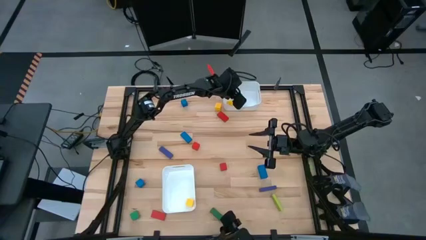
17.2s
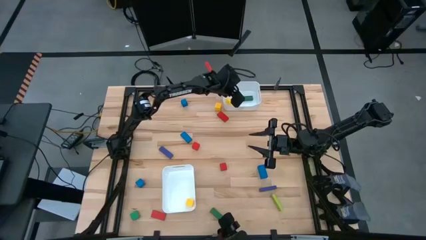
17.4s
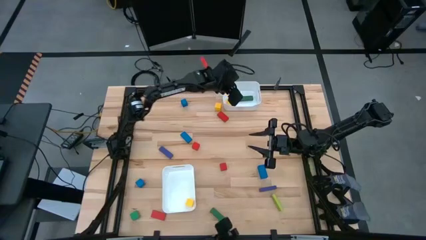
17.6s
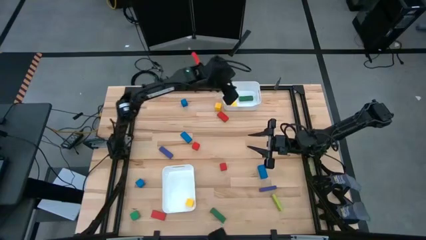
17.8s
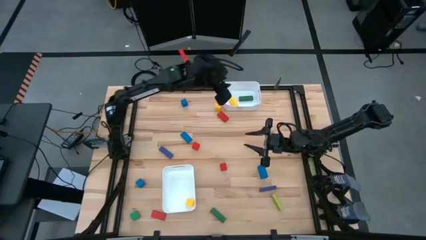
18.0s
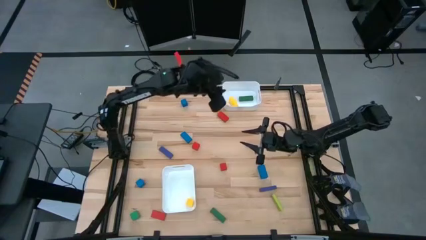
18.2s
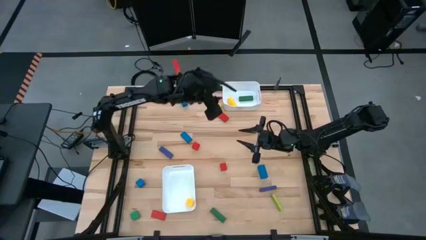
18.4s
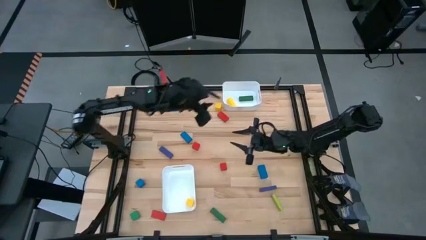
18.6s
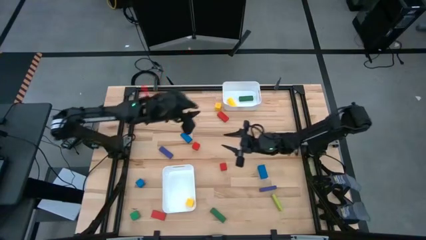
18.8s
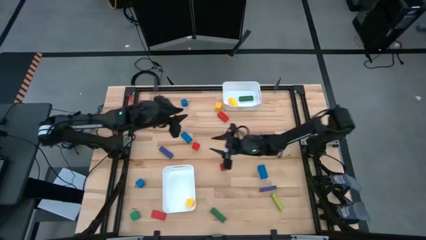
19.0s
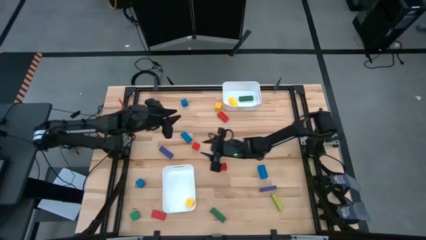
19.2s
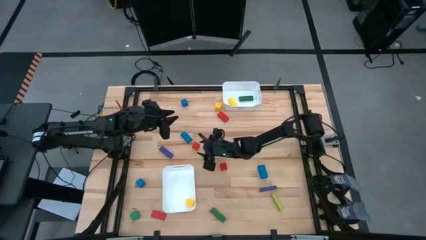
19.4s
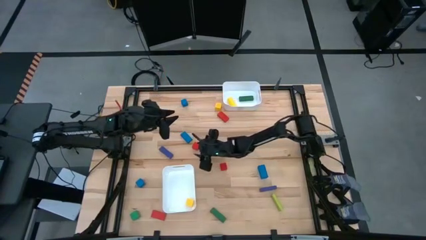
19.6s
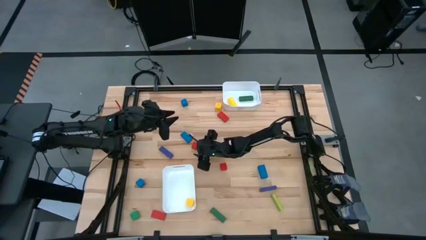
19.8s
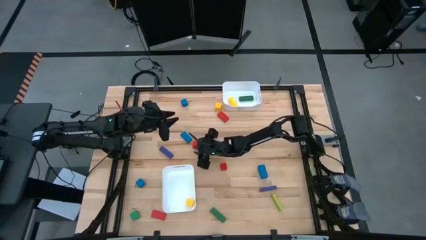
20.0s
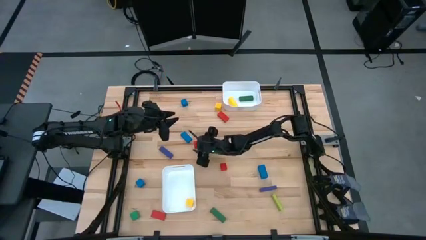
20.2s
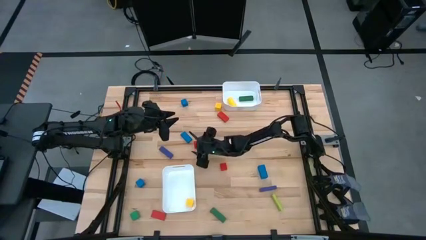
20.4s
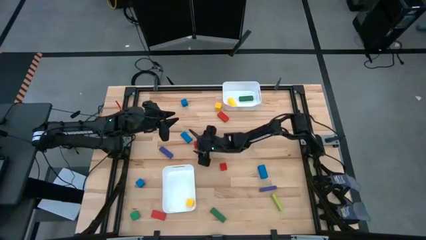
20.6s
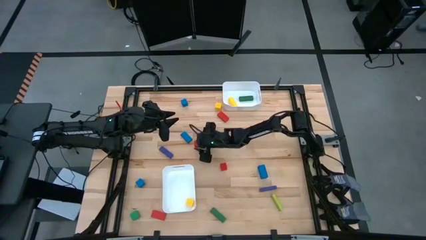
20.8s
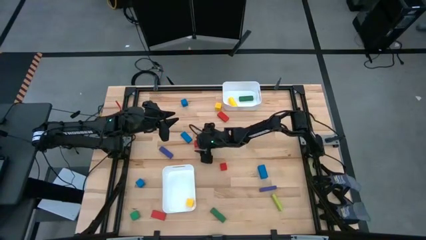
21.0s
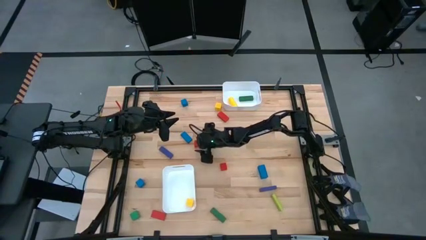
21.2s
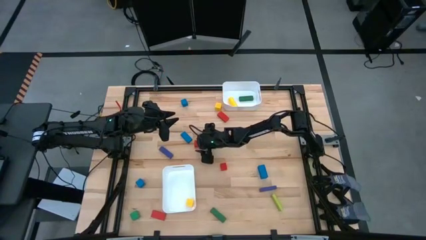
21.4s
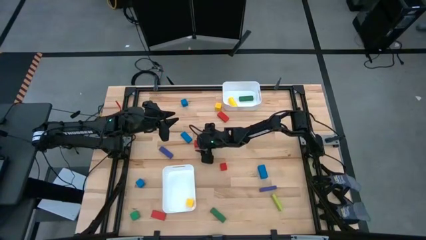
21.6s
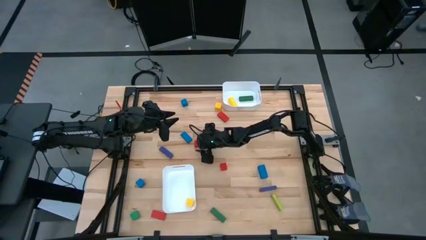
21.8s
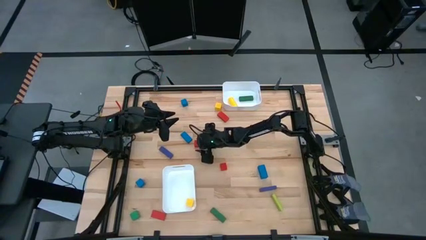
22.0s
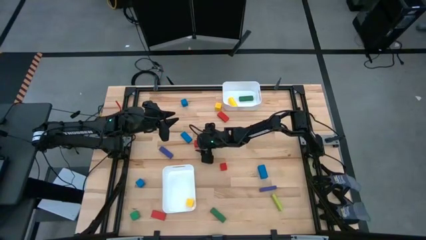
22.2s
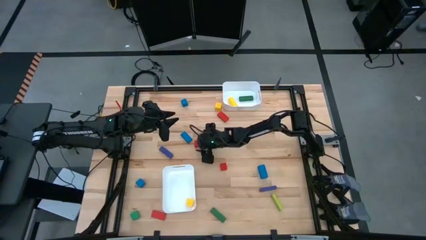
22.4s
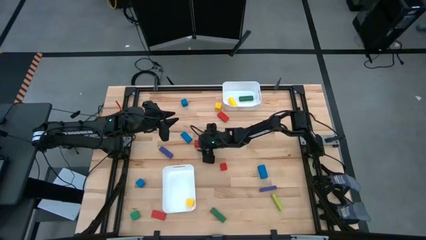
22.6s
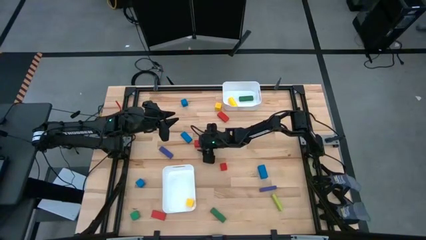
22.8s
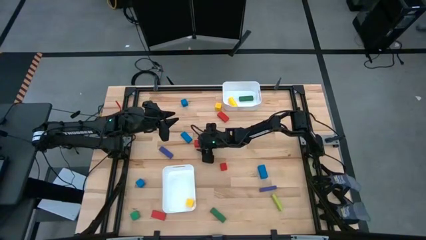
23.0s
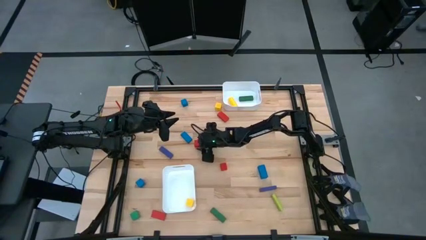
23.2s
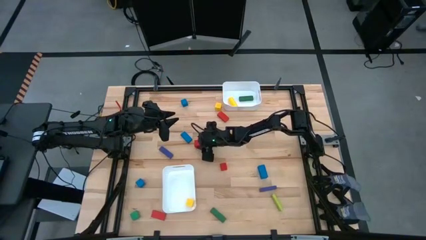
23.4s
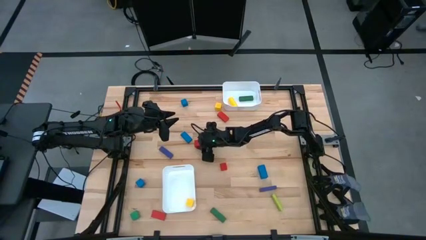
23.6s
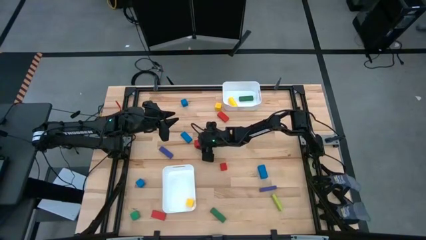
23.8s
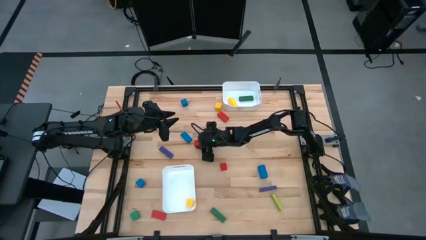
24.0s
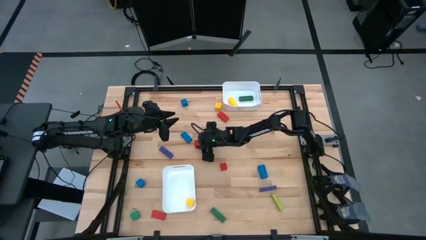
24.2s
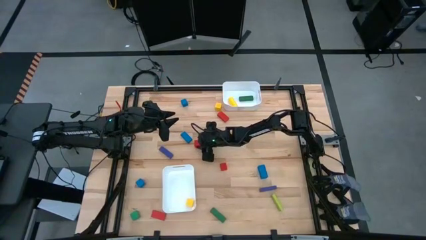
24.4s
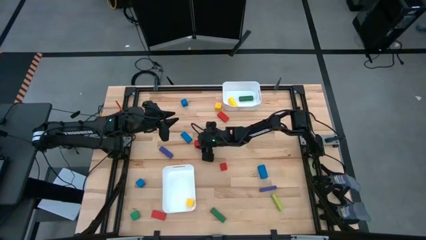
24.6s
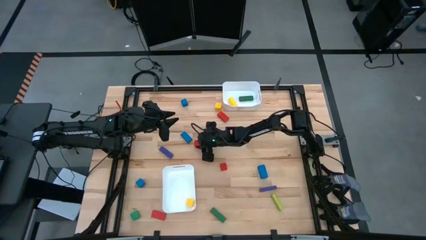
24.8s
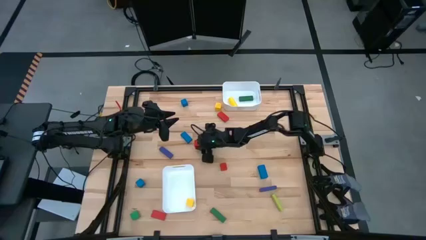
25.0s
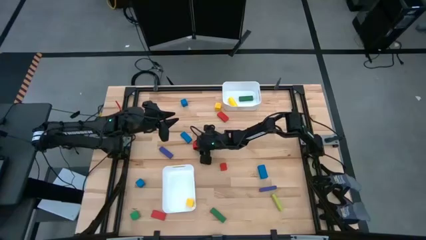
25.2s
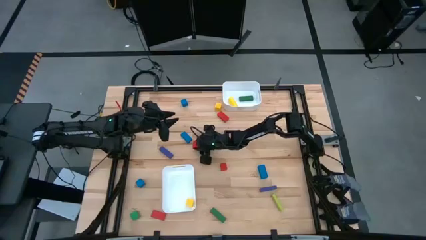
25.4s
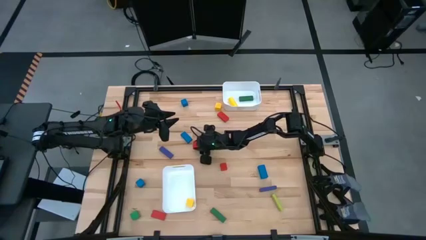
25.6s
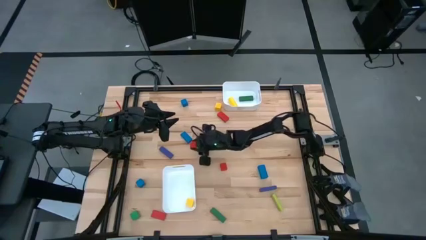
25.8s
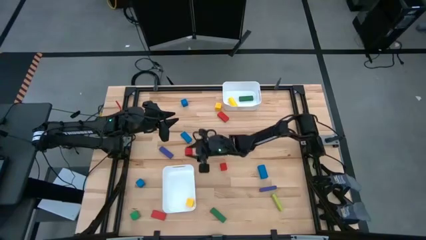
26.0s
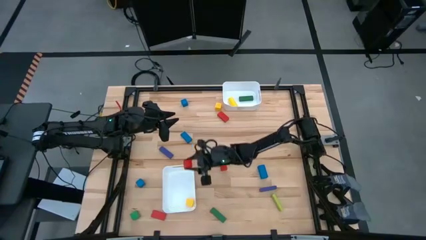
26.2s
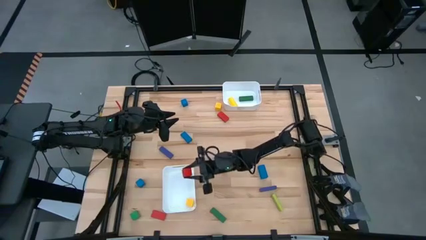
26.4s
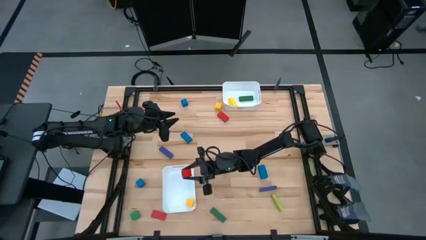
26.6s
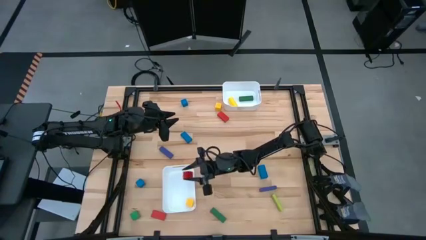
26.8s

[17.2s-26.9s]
Task: Sort blocks by size
Put the red small block into the bottom white bin

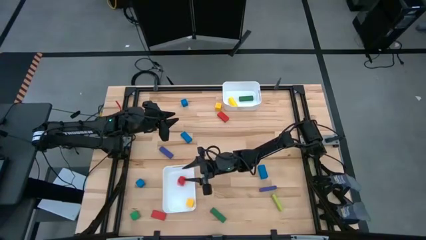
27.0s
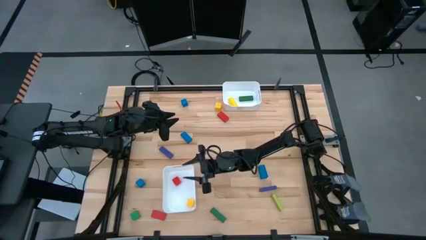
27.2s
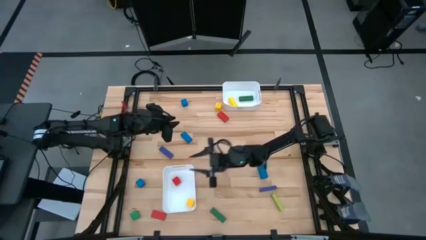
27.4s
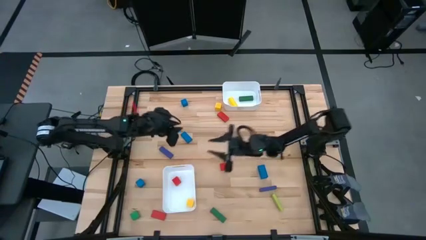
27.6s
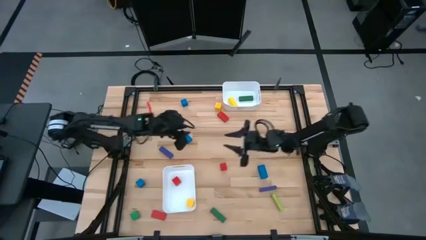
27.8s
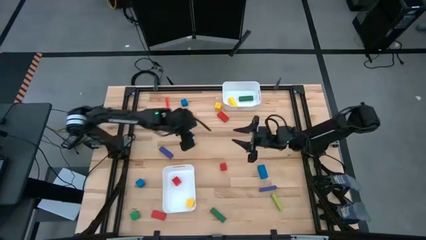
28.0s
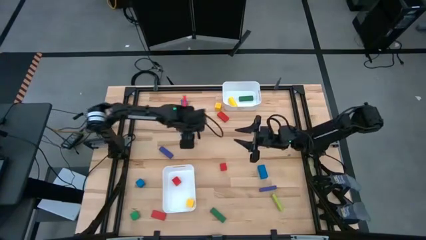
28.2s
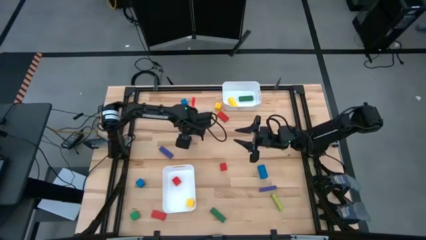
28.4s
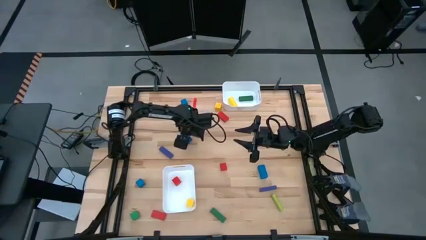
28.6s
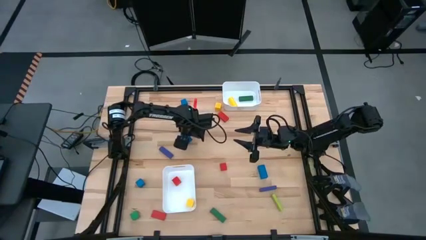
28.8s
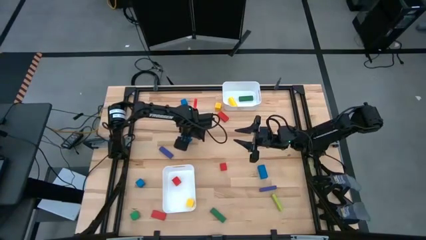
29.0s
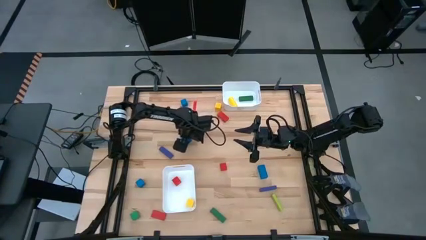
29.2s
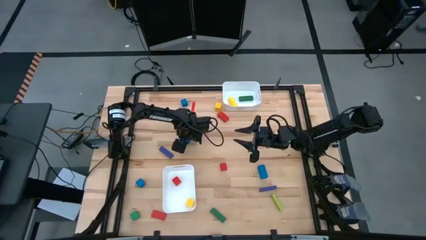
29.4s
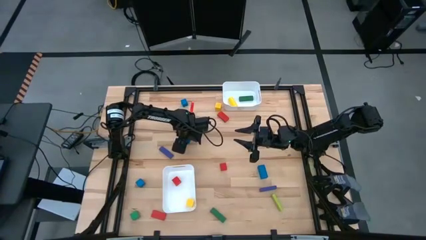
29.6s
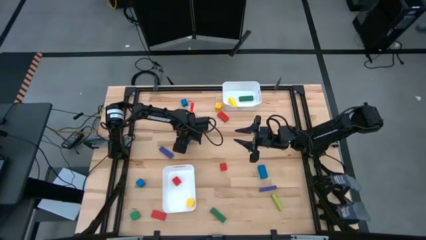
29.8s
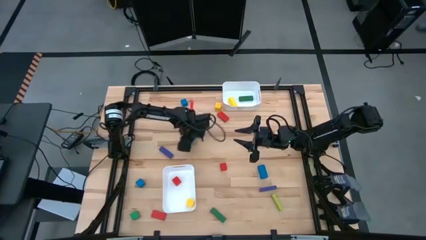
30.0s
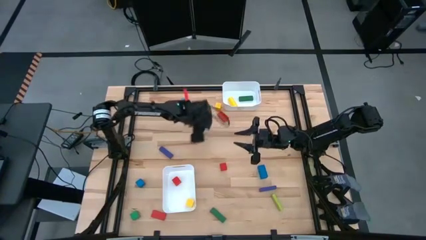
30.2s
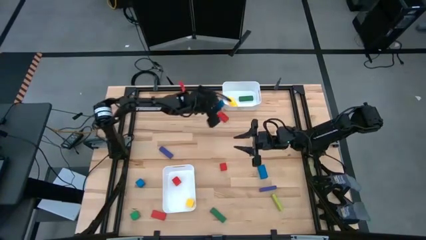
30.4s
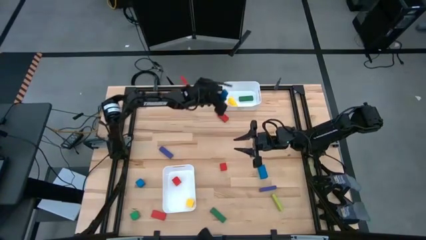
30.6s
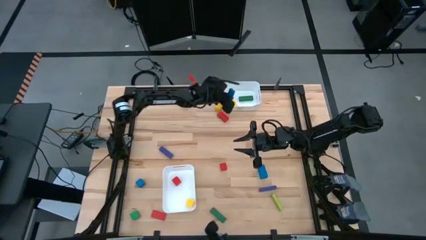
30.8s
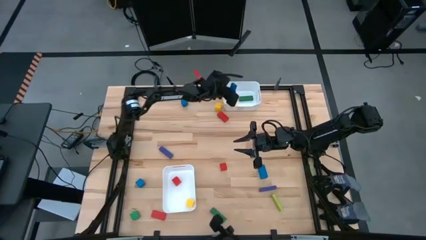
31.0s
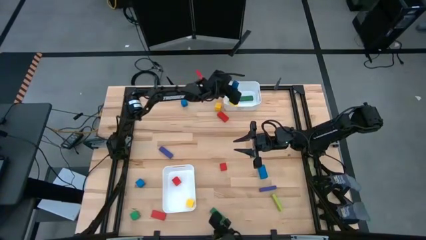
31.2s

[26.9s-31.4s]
Put the blue large block into the top white bin

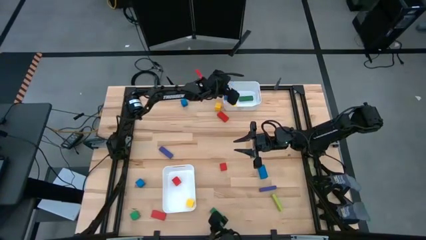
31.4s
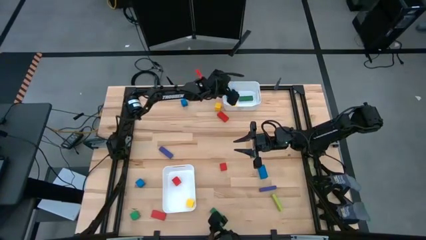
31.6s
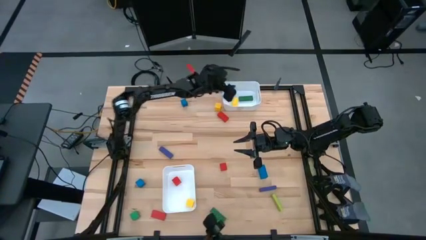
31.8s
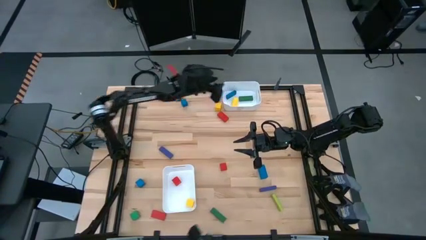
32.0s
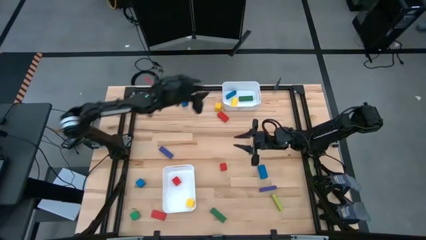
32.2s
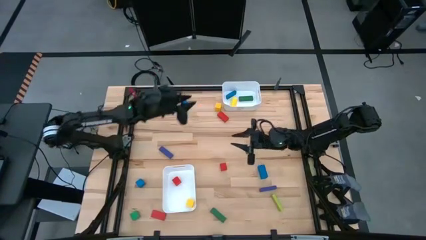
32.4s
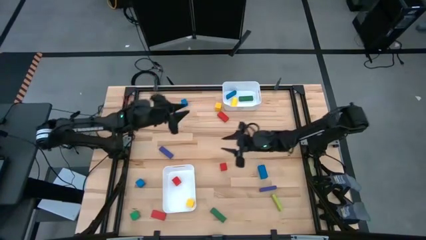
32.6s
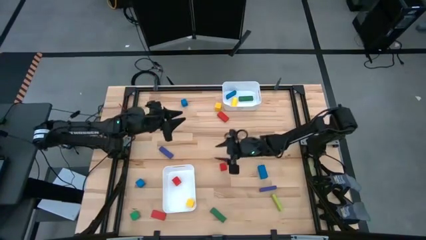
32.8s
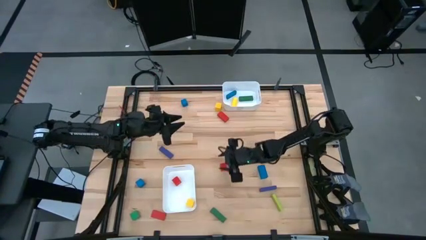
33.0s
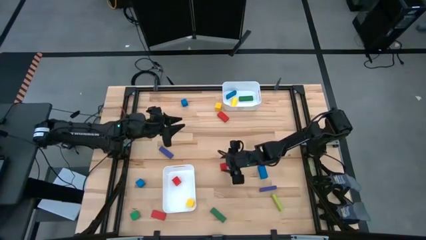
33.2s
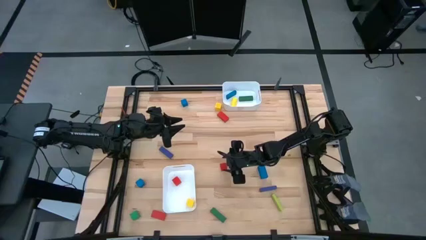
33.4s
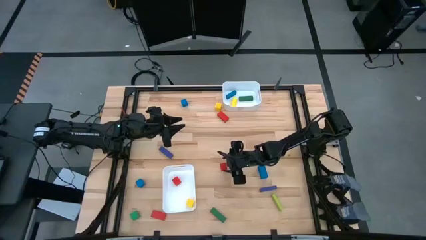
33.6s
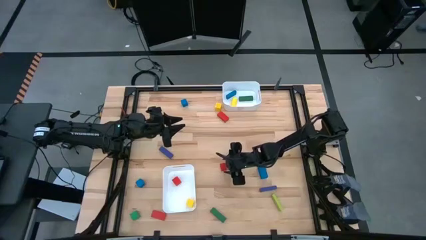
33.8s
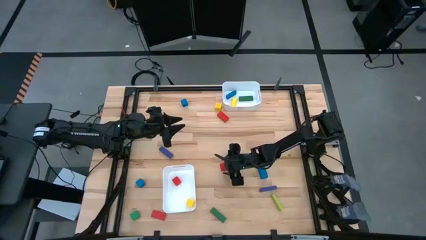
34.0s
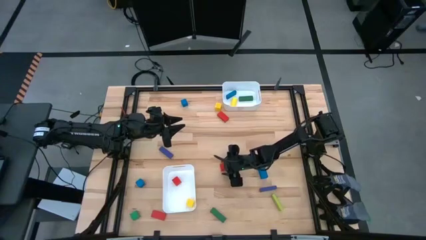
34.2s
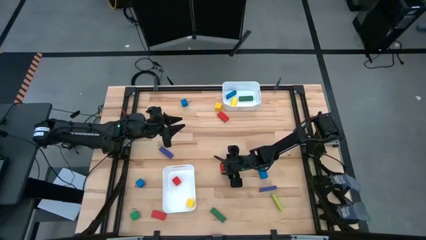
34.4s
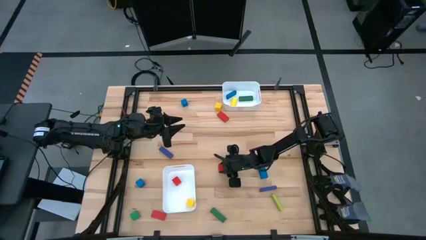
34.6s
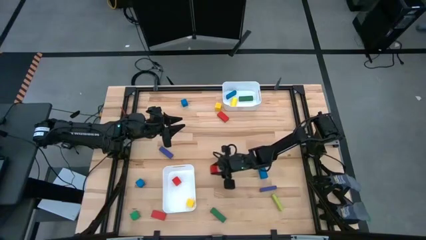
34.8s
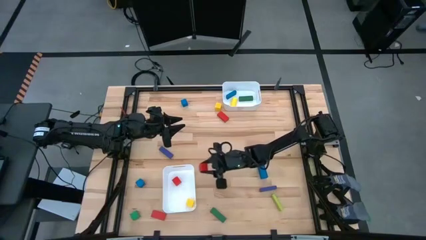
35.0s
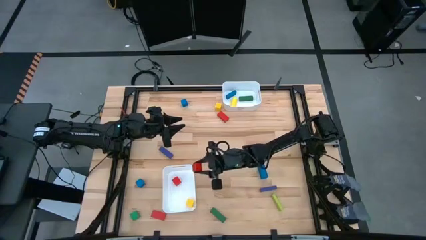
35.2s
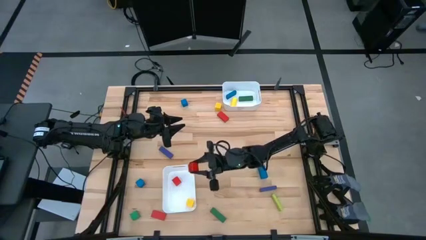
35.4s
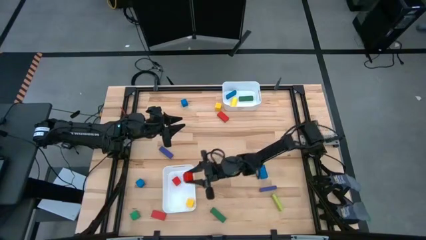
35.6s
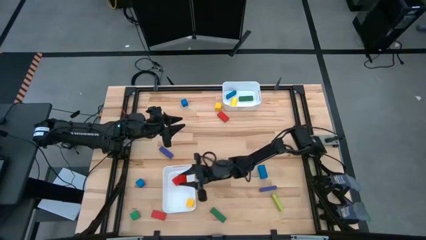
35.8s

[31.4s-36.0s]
Put the red small block into the bottom white bin
